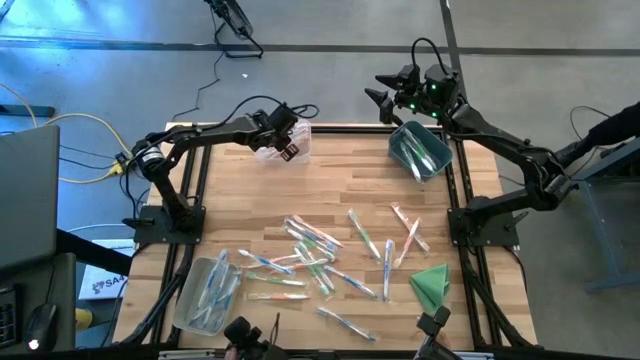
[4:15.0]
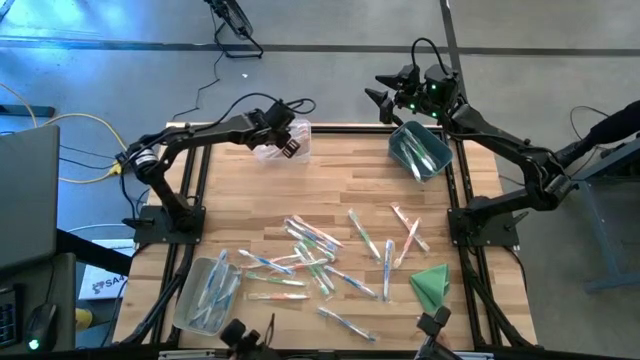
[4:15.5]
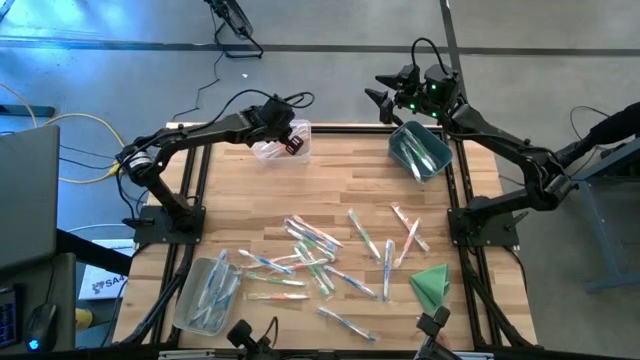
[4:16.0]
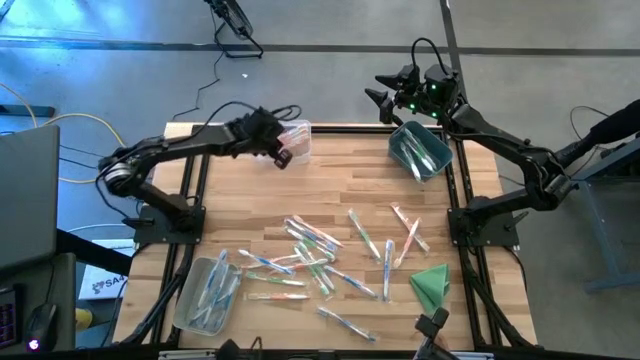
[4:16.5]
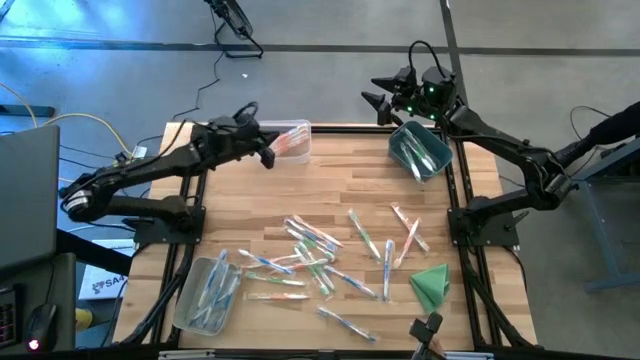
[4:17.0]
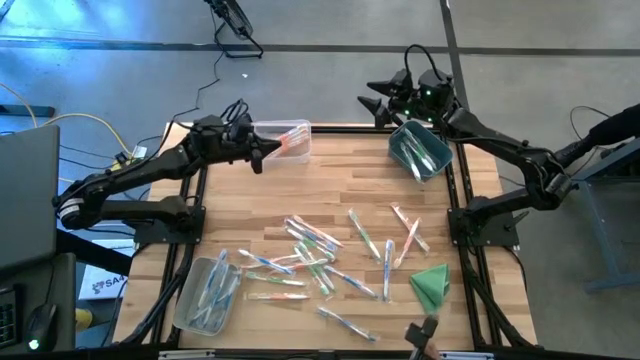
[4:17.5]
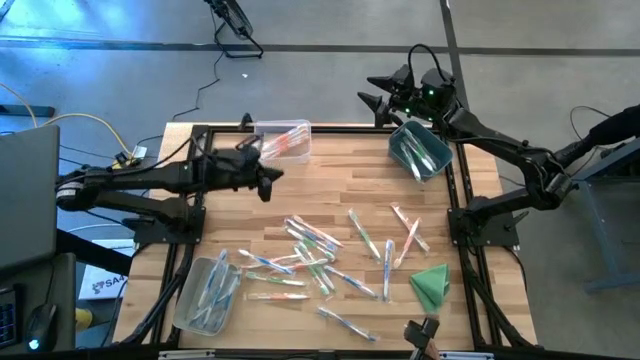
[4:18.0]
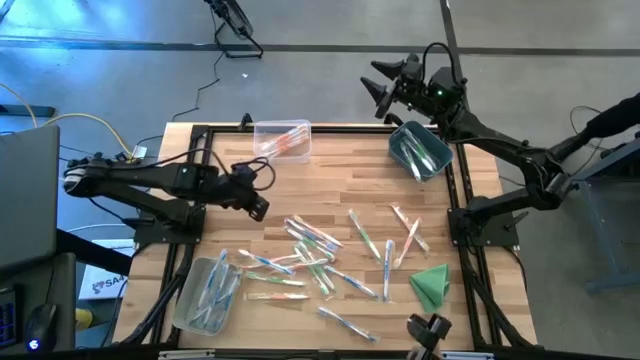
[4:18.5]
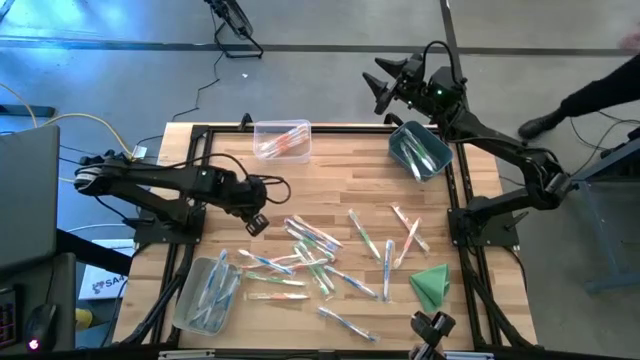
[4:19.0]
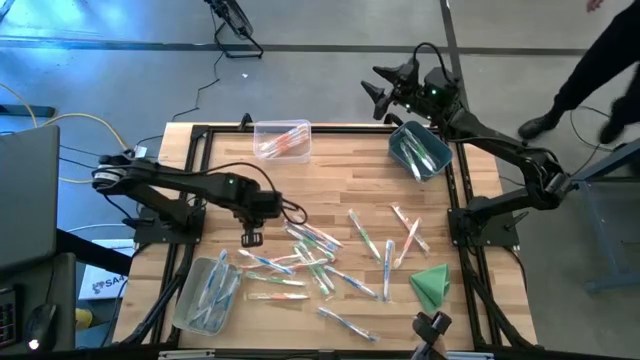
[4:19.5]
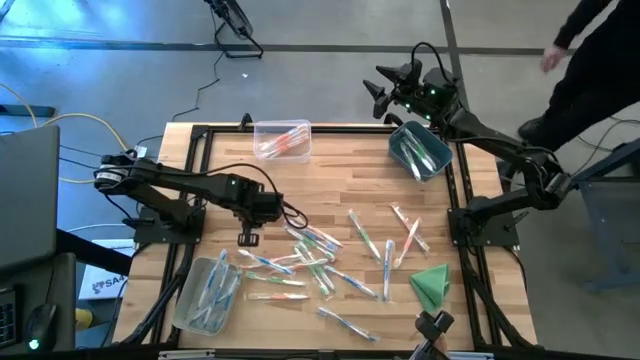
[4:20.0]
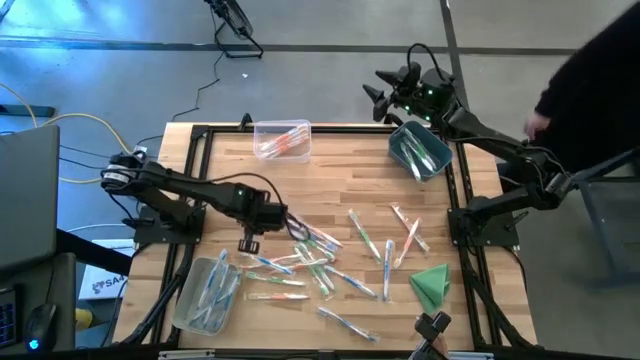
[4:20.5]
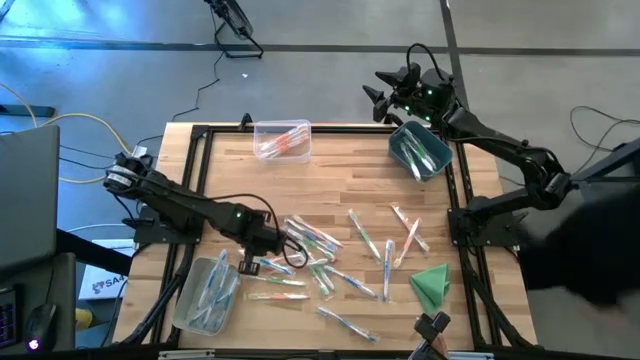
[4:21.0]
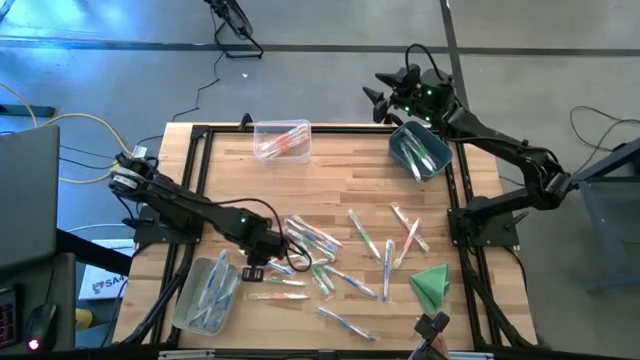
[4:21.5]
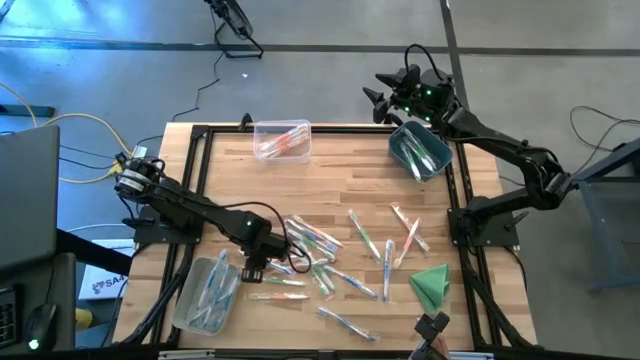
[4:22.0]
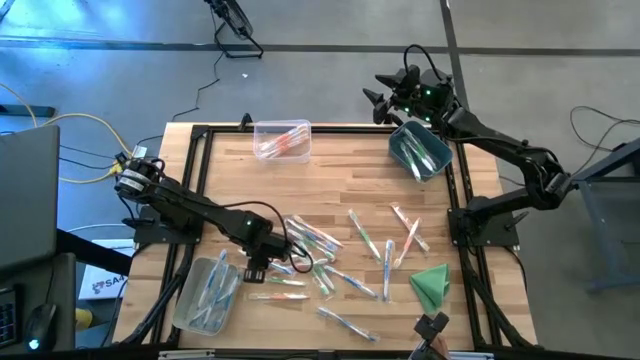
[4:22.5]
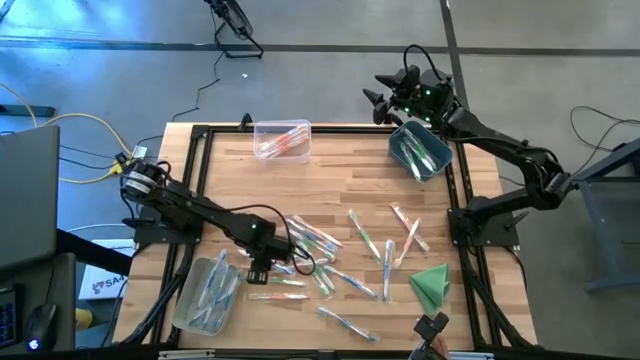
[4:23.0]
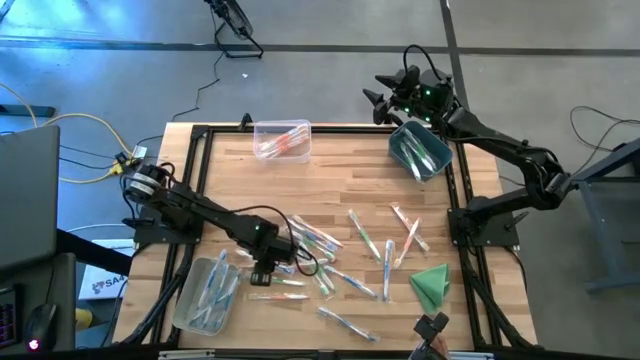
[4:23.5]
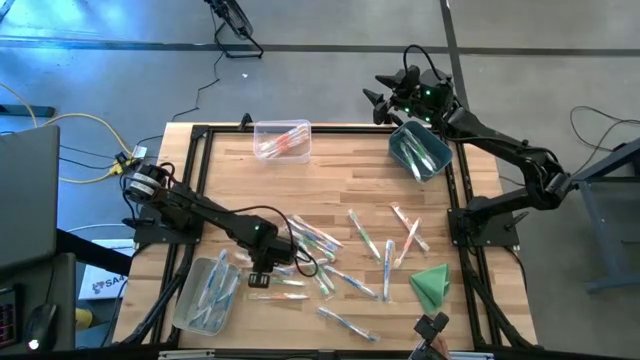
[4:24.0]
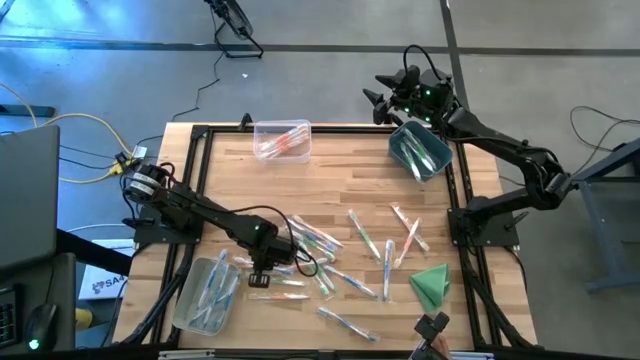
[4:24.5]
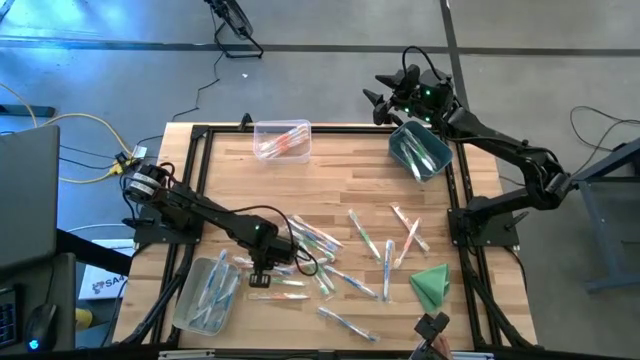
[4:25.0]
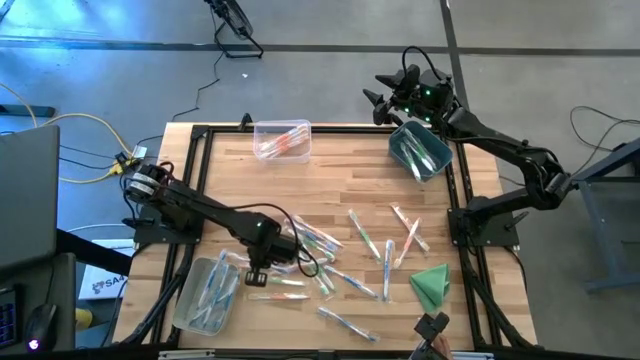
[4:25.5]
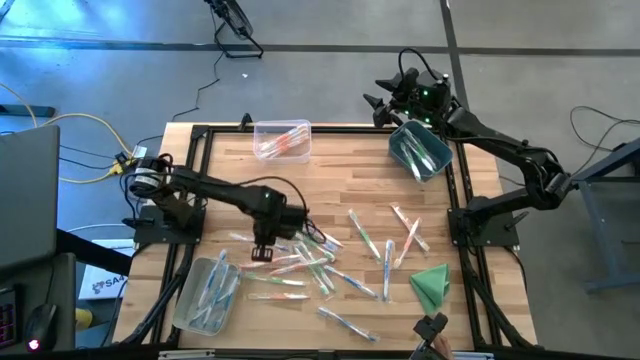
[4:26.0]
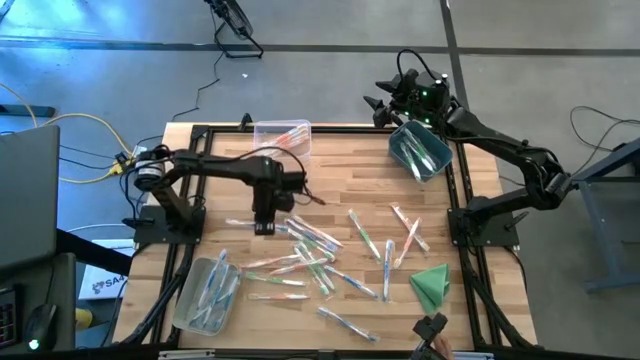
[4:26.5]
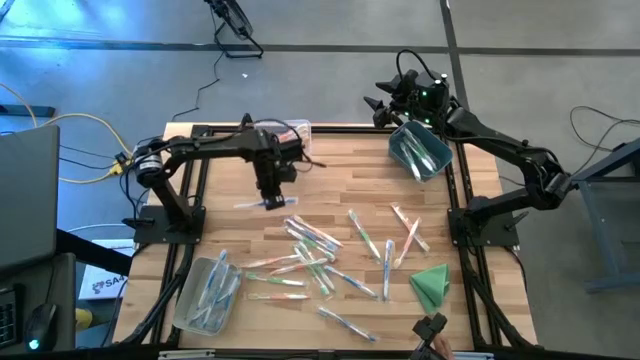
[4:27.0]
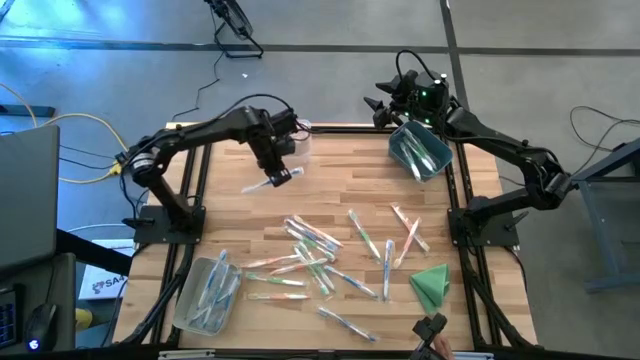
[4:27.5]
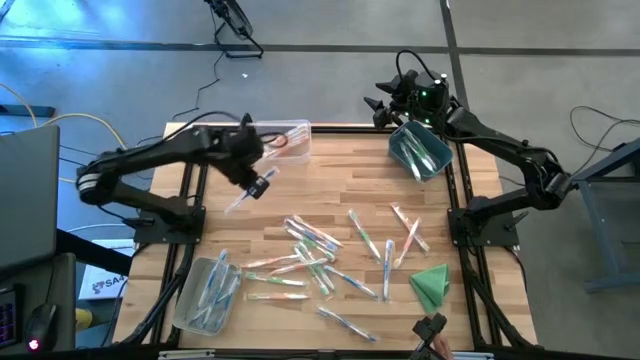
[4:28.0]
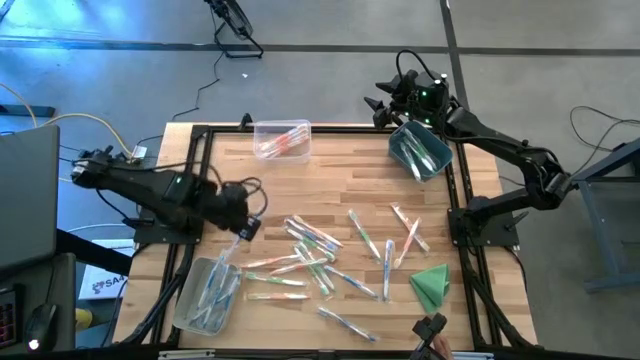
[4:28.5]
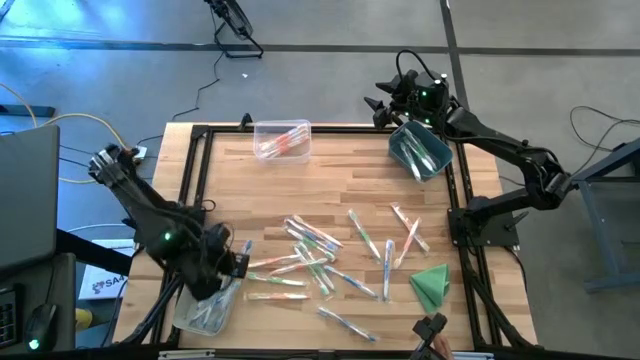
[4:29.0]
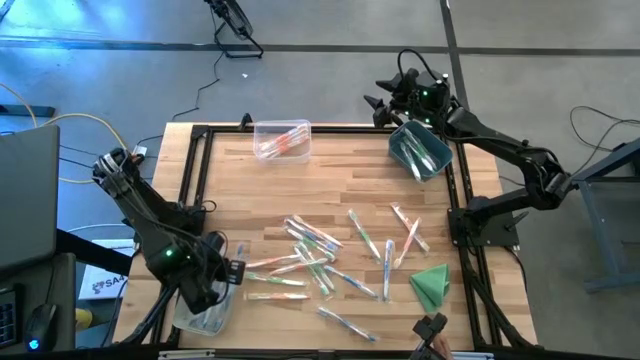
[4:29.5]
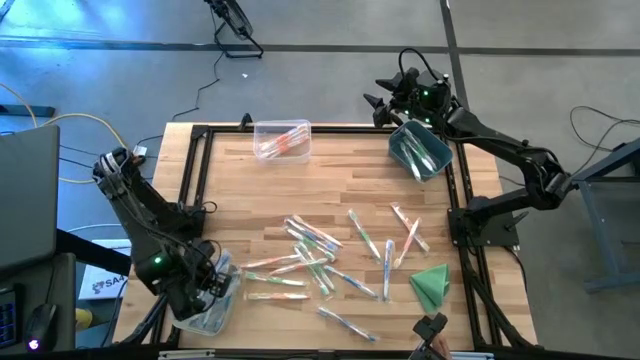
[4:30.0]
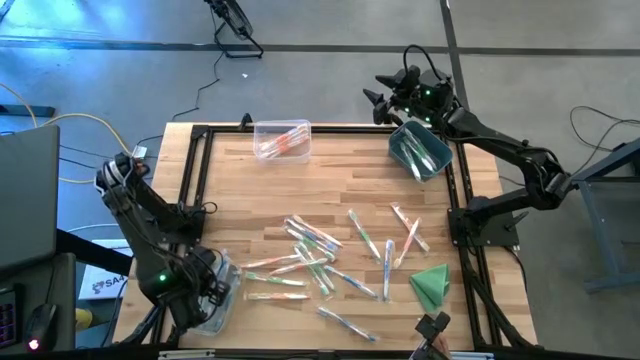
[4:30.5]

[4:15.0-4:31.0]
Task: Pick & Place Toothbrushes
Put the blue toothbrush into the gray bin
